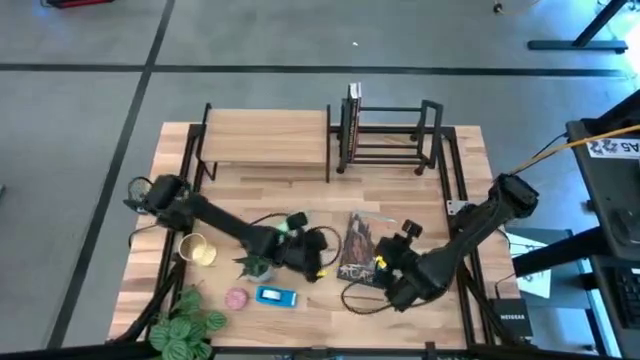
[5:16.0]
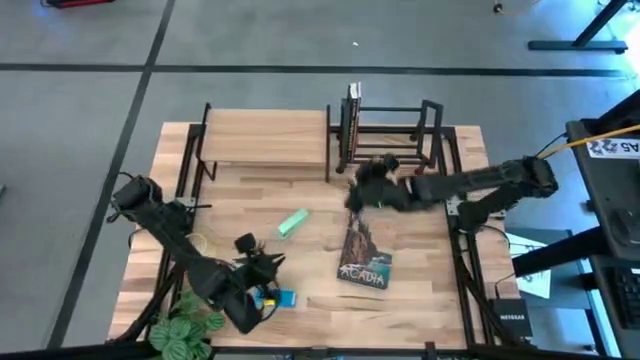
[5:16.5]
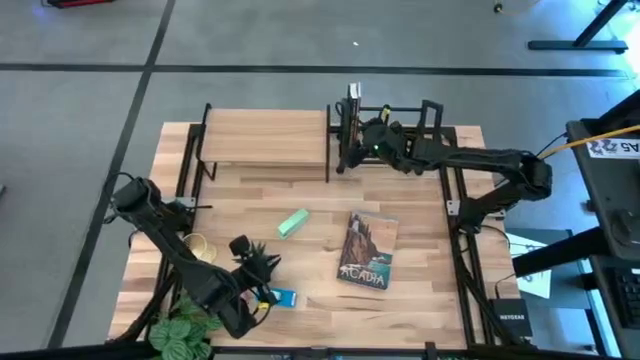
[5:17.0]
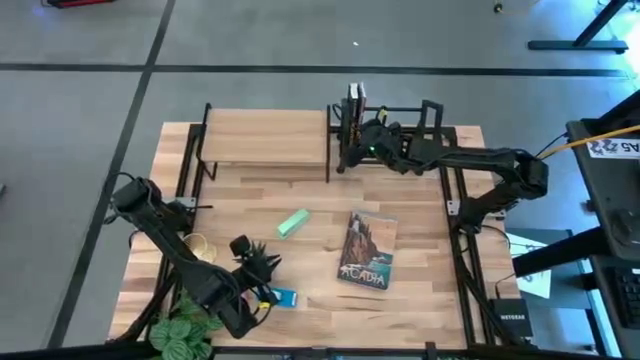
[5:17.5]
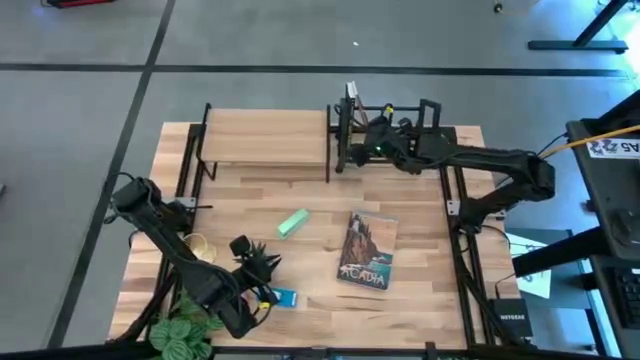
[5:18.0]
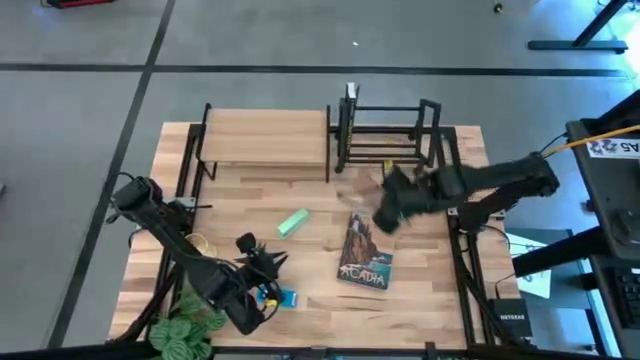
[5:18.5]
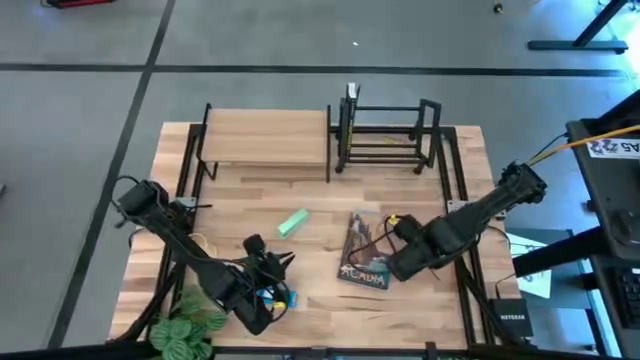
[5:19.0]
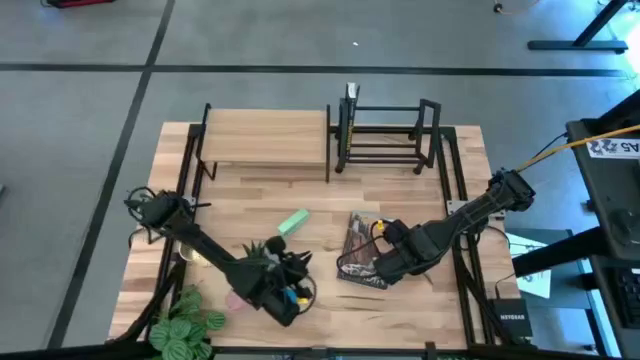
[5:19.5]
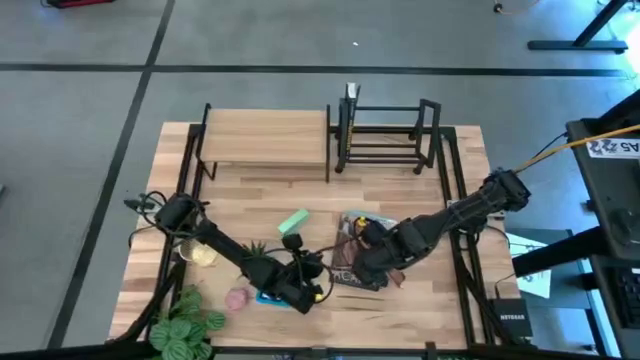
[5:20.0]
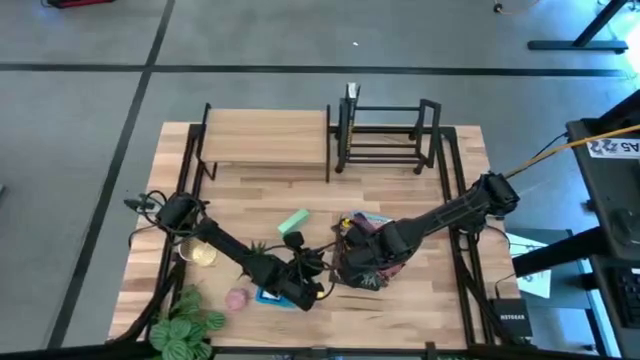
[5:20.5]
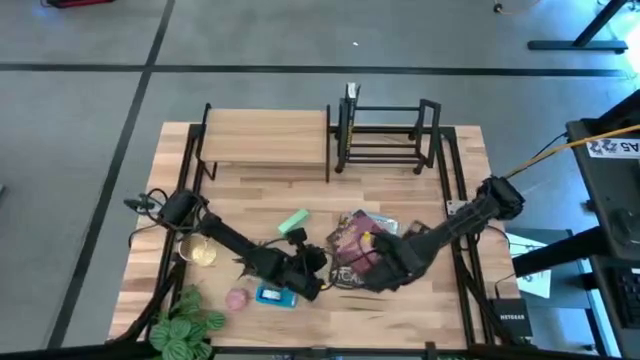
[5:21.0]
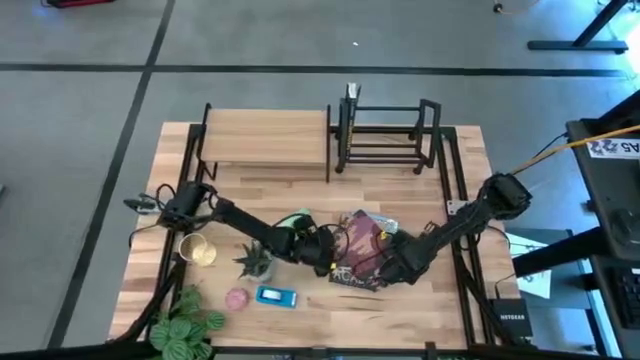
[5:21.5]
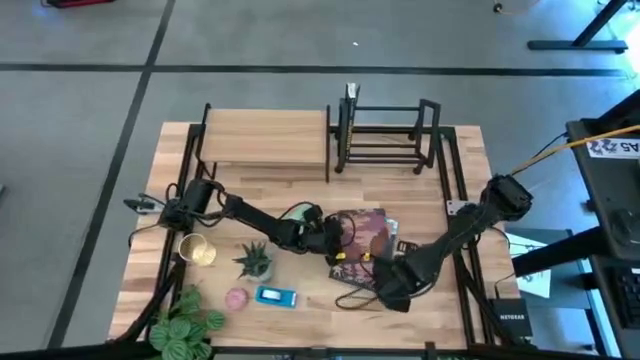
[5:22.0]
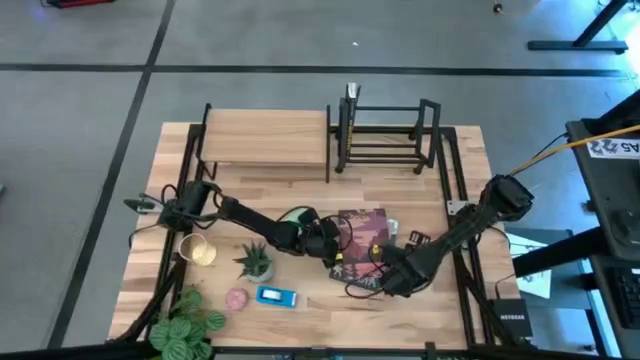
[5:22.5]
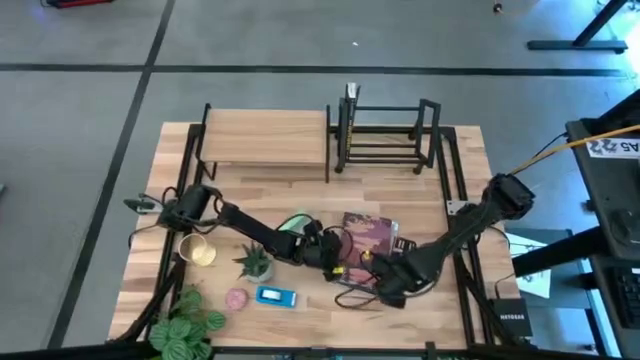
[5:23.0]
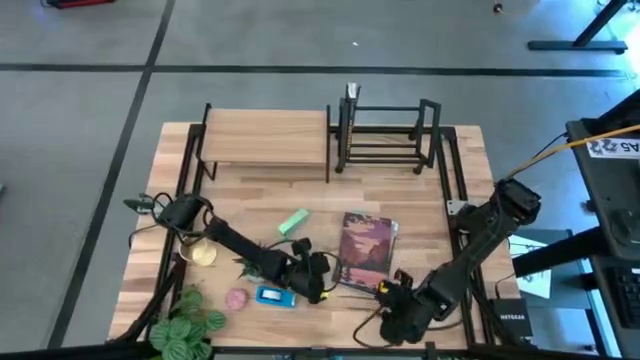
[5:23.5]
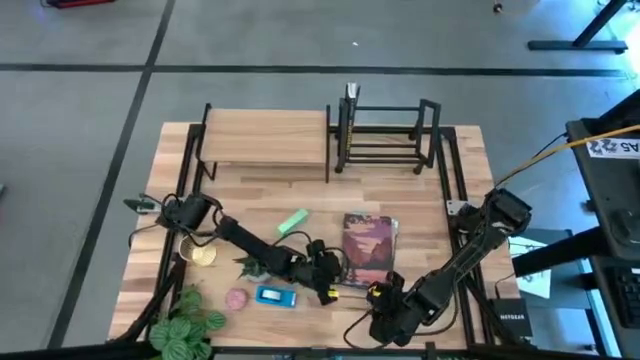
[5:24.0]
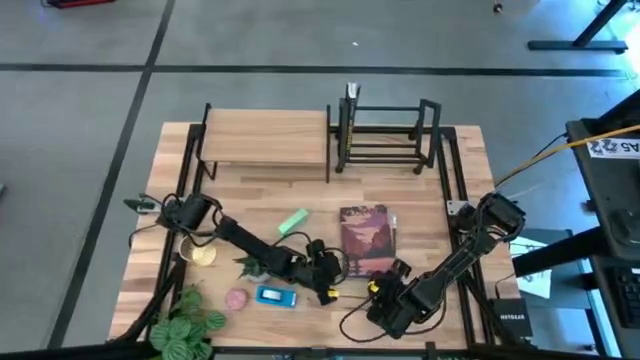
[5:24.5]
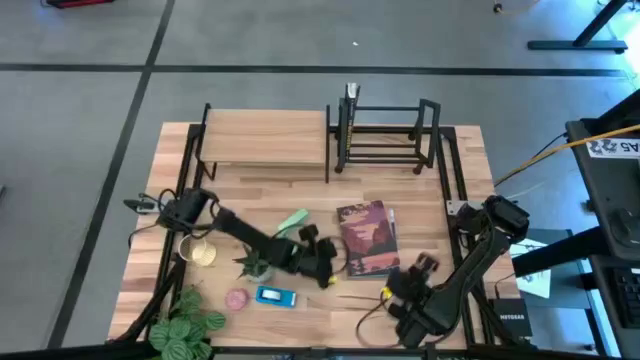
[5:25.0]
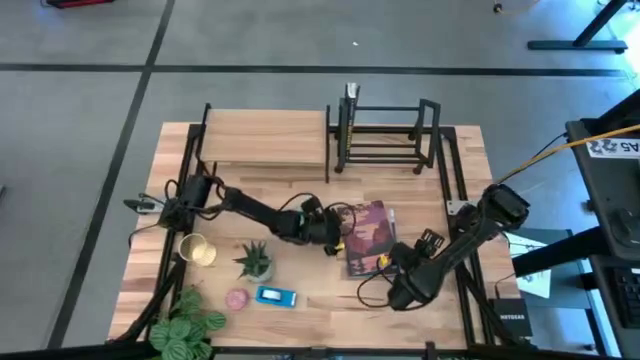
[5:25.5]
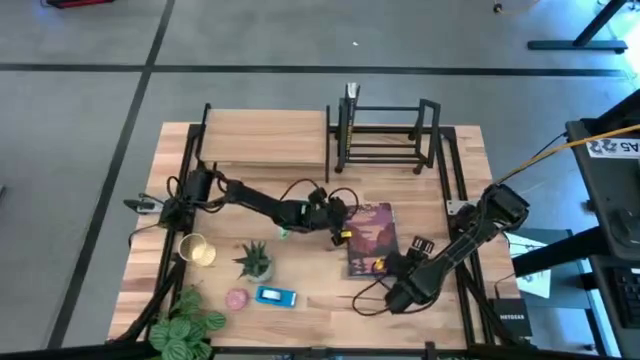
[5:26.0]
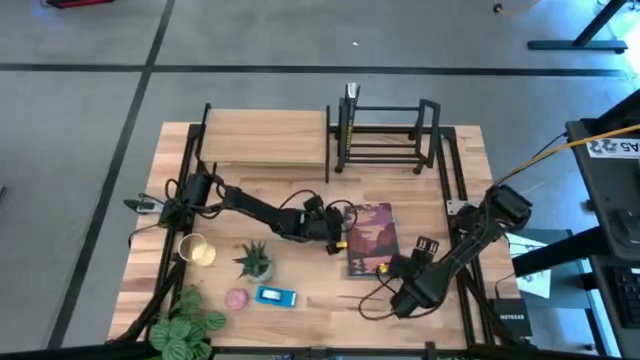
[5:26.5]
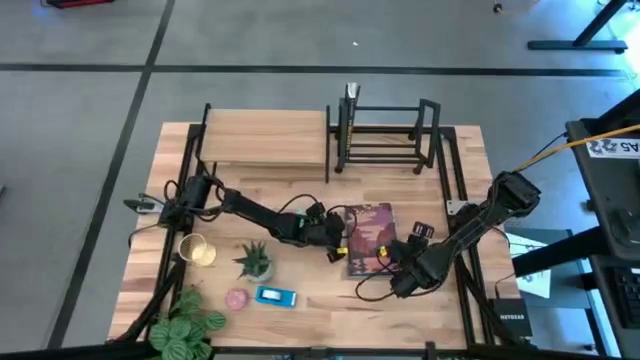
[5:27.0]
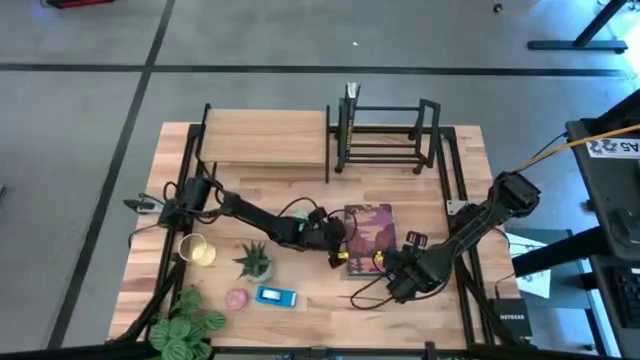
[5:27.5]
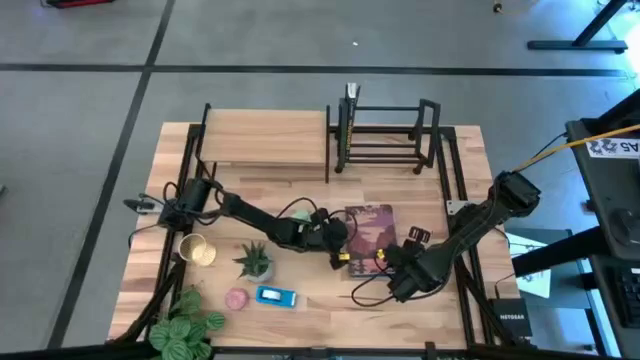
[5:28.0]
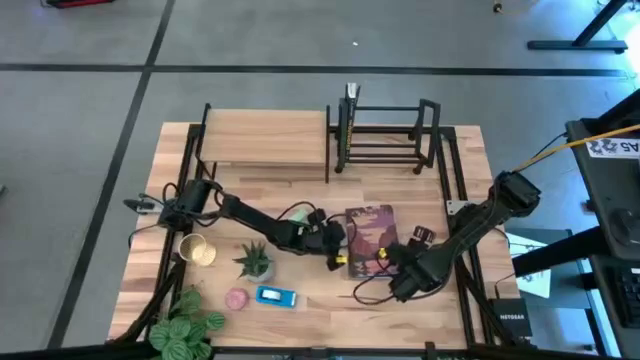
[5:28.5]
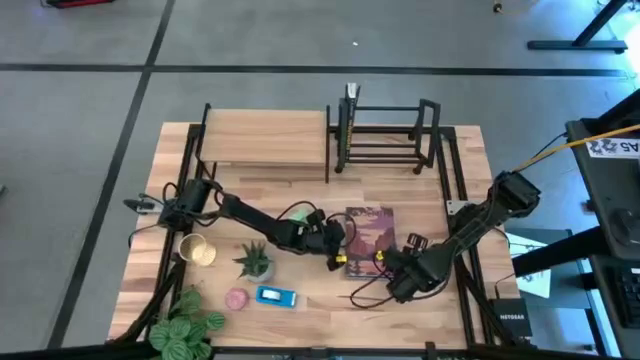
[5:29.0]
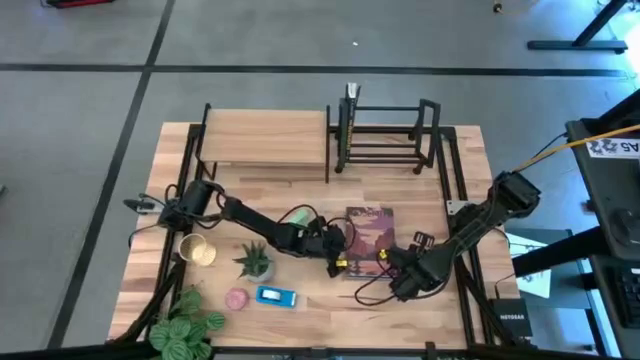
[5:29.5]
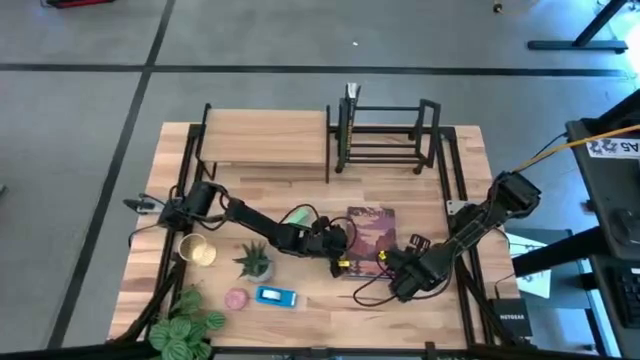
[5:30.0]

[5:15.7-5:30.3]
Task: Stock shelves
Remove the red purple book from the bookshelf

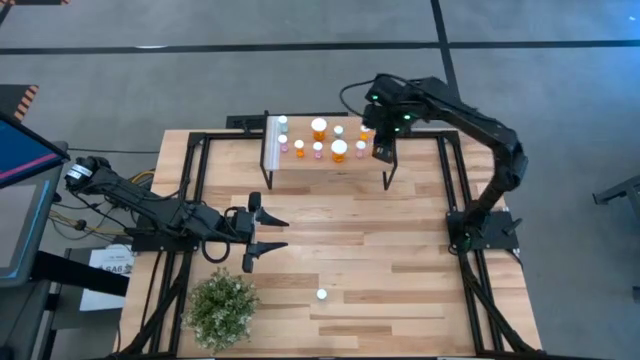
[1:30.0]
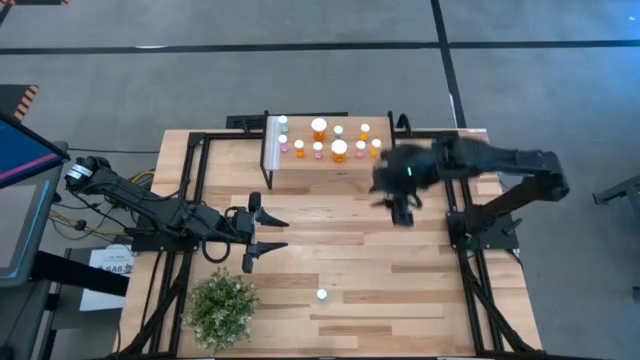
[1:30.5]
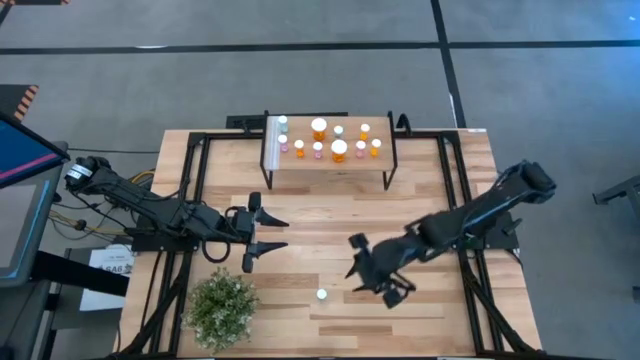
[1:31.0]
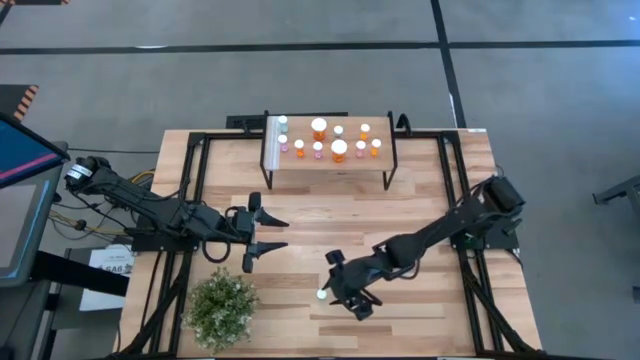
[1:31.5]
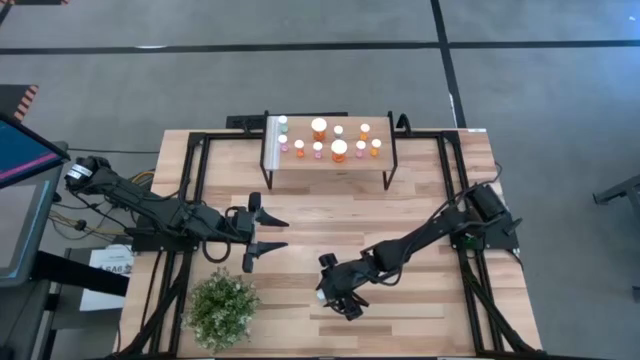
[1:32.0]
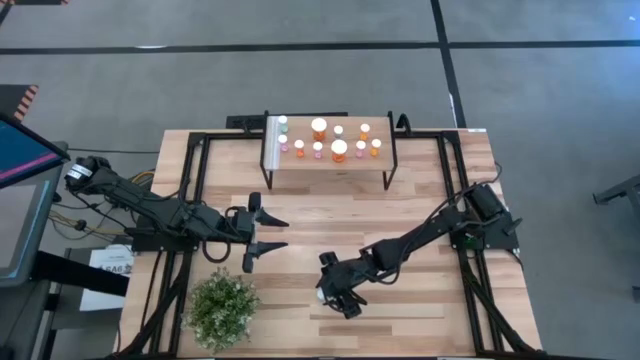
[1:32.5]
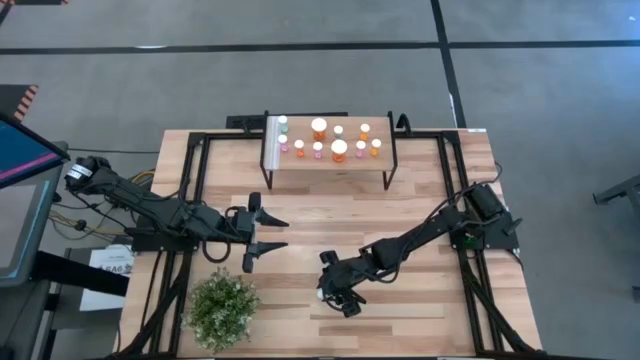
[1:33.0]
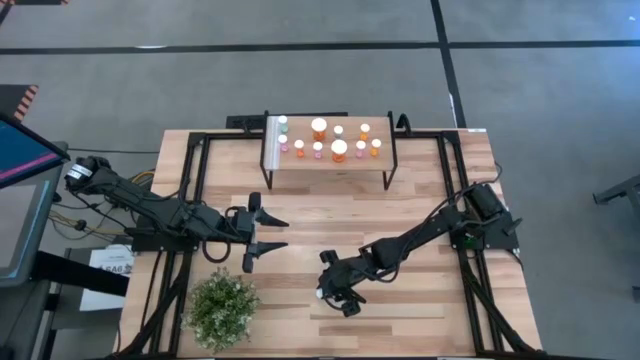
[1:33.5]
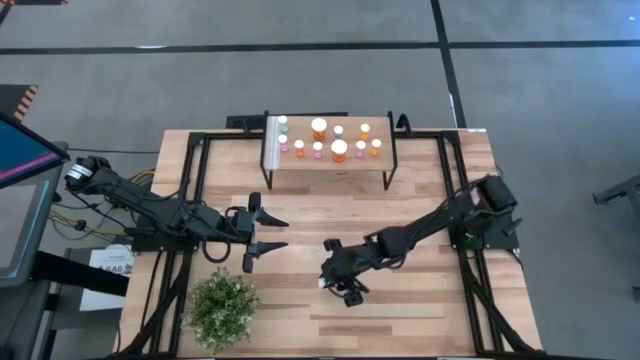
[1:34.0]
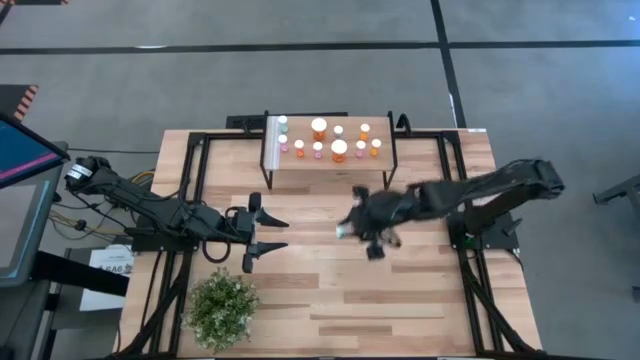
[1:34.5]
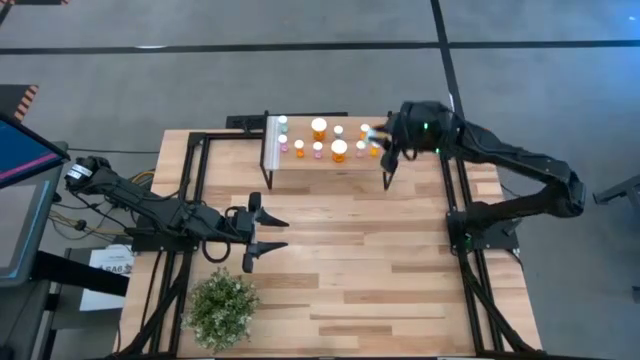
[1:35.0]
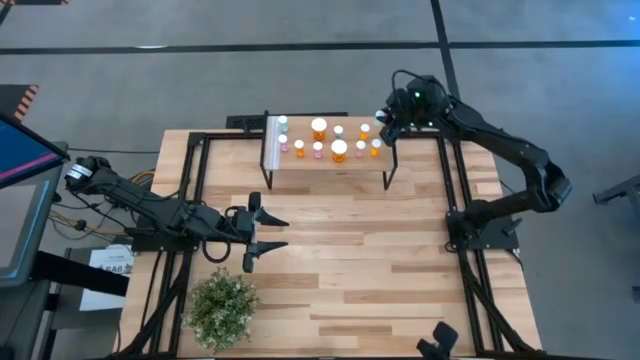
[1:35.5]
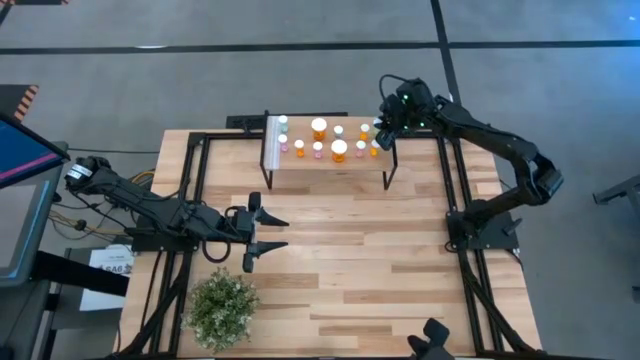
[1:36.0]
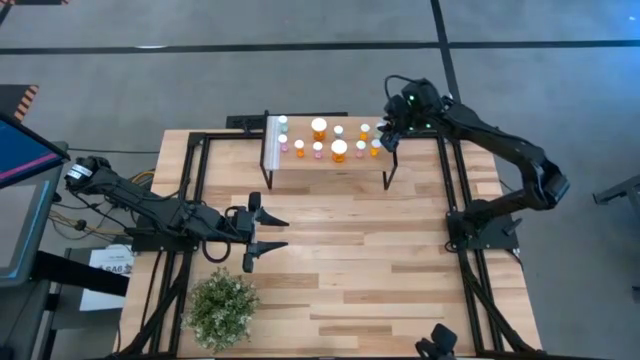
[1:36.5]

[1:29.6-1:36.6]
Task: Pick and place medicine bottles onto shelf by color
Put the blue pill bottle on the shelf
